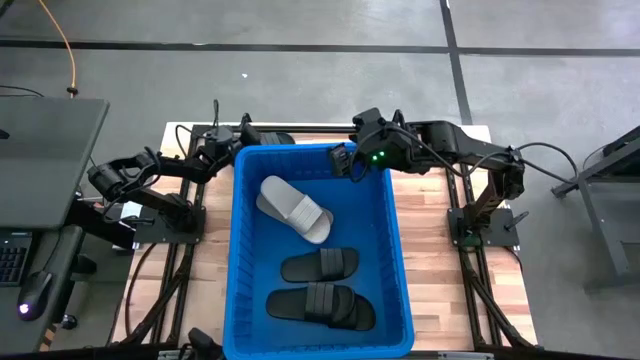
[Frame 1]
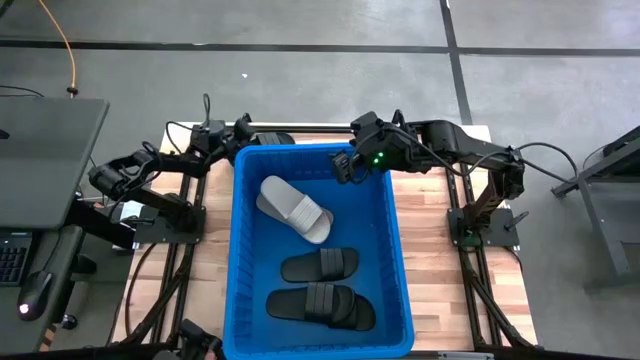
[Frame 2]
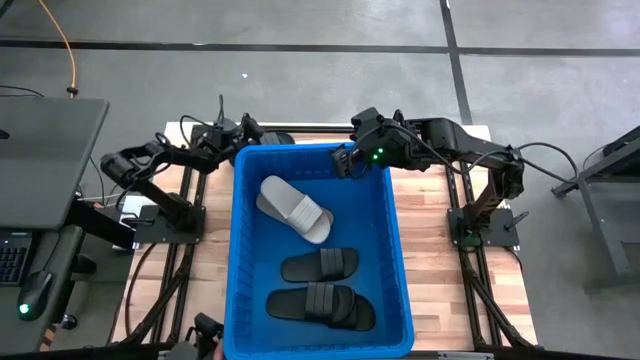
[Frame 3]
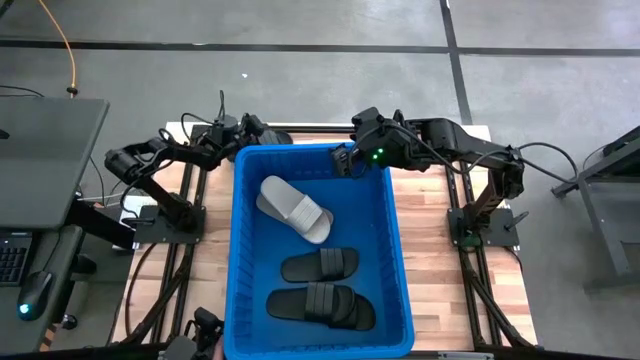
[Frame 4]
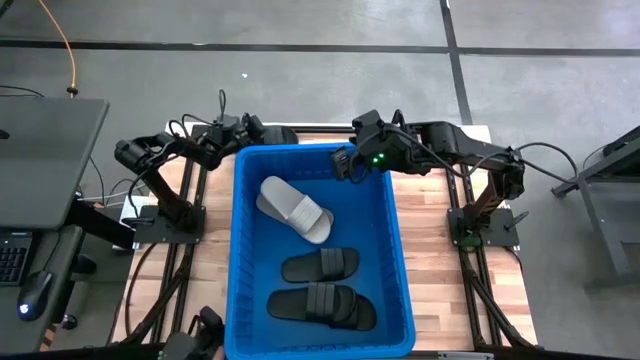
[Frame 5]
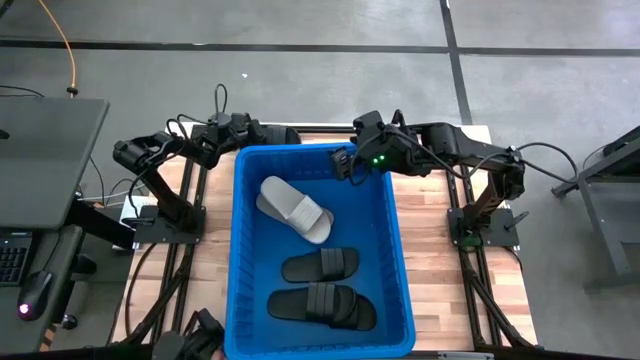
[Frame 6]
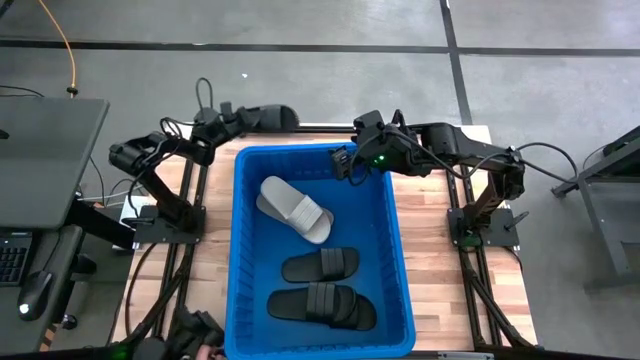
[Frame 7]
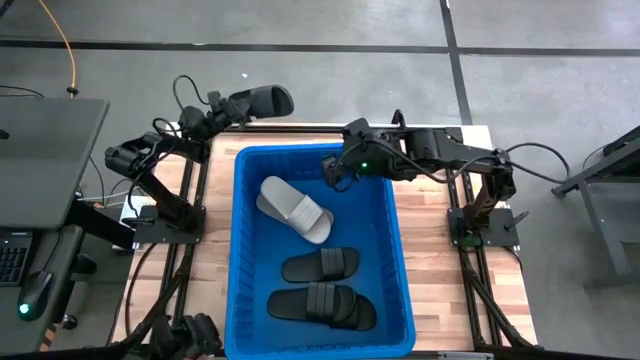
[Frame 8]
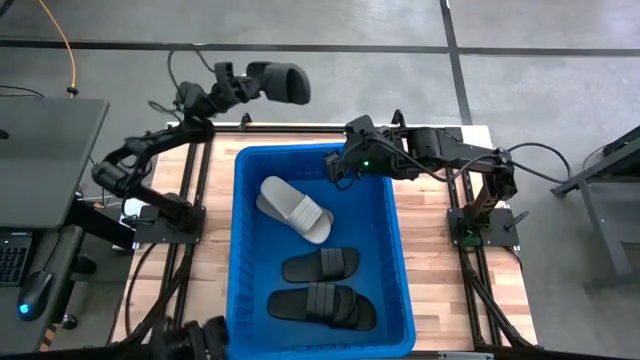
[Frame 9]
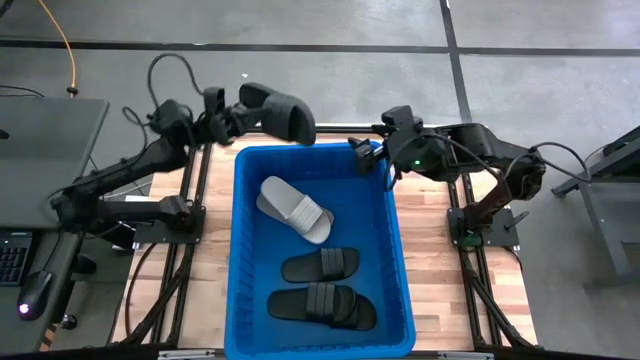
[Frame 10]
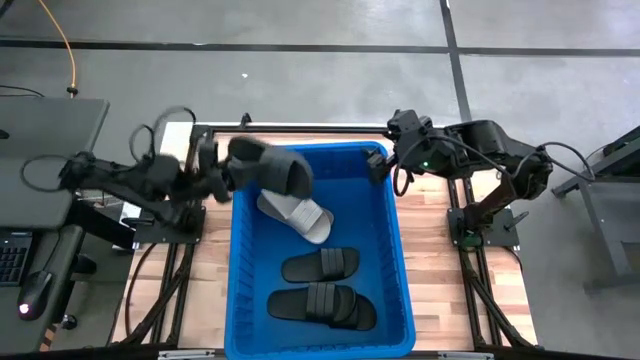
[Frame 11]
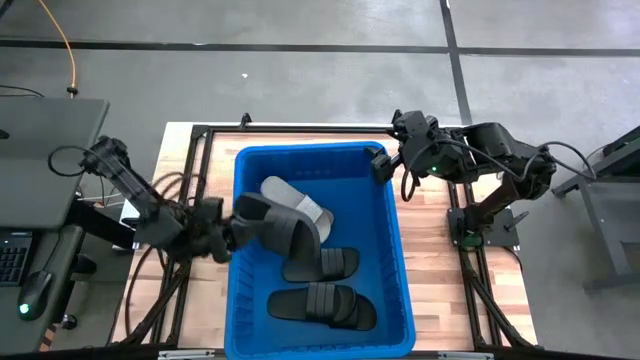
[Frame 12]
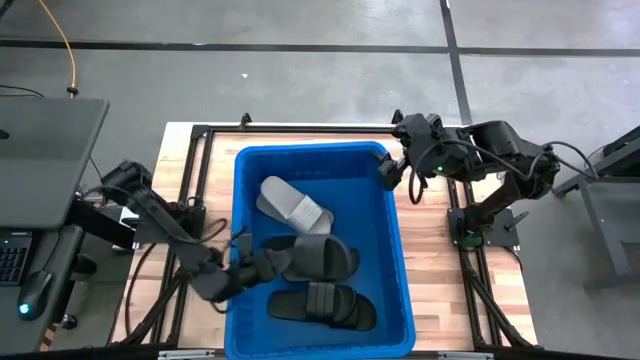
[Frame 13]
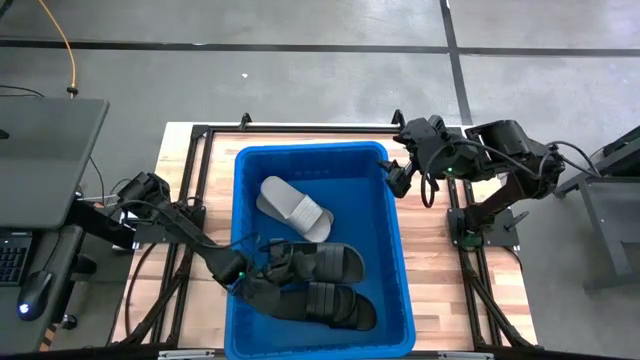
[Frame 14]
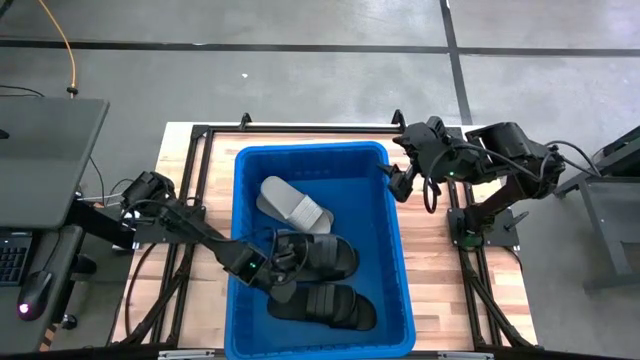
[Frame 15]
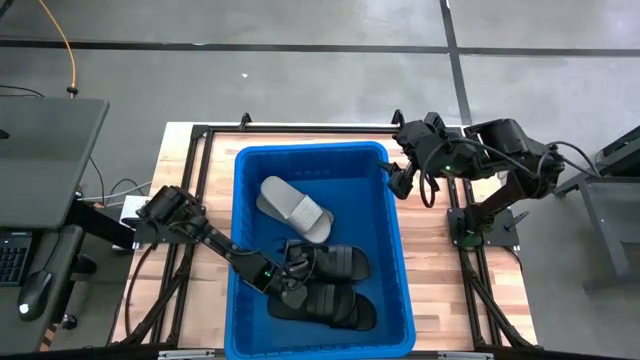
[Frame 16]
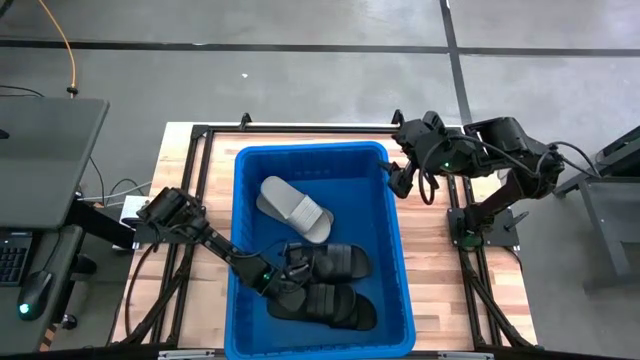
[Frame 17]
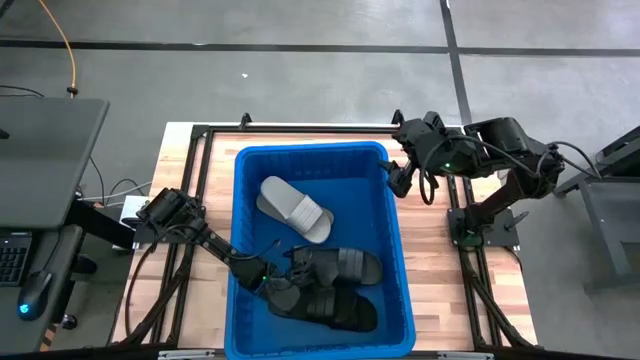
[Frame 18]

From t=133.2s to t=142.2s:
Task: Pick and place slides into bin
Put the black slipper into the blue bin

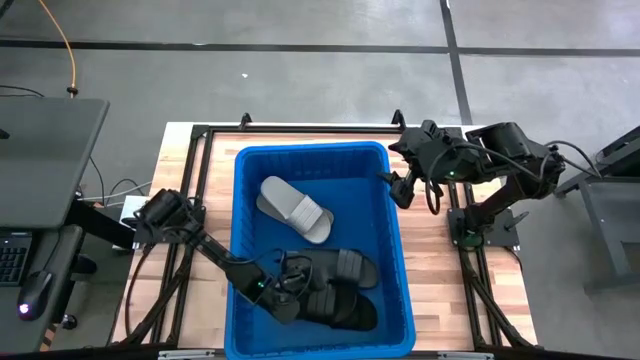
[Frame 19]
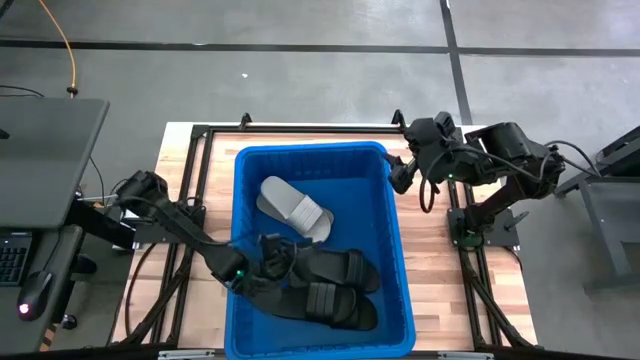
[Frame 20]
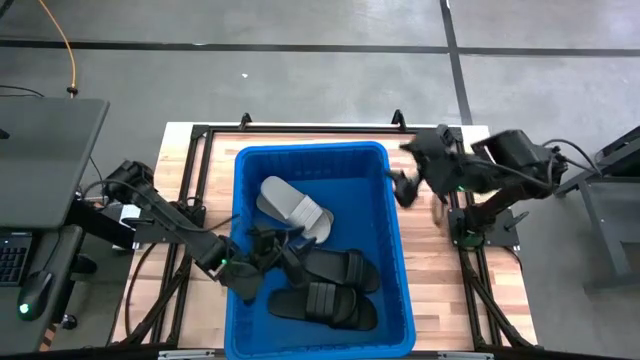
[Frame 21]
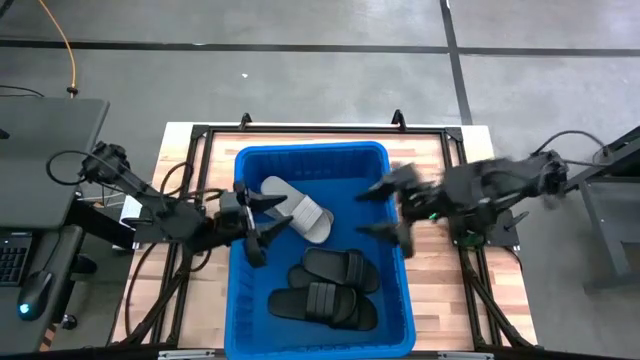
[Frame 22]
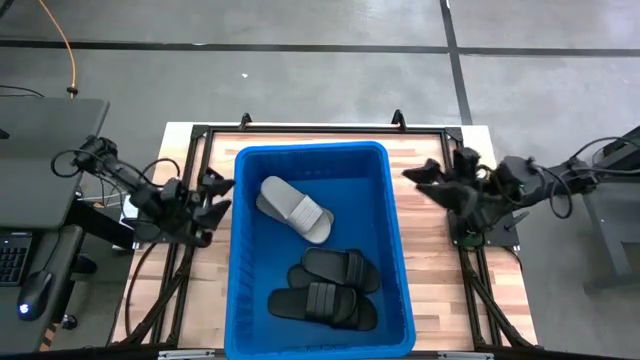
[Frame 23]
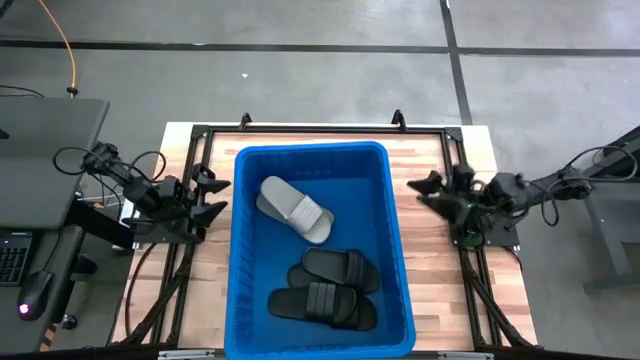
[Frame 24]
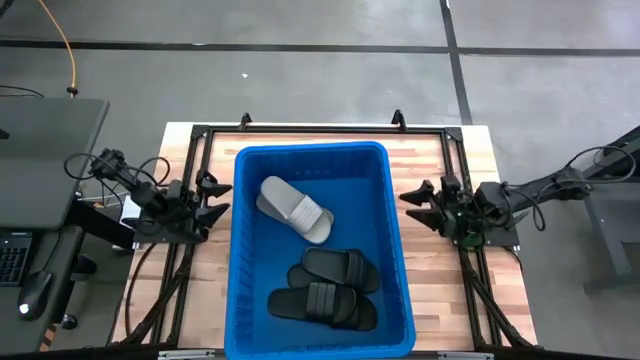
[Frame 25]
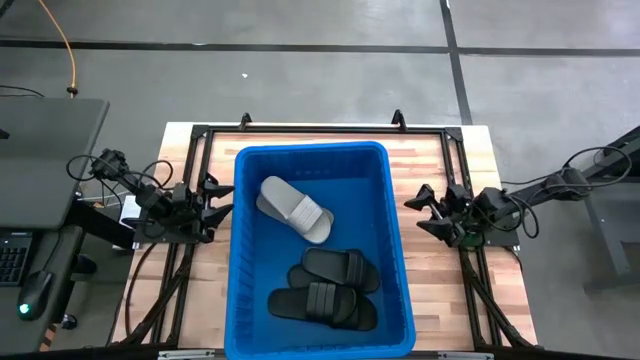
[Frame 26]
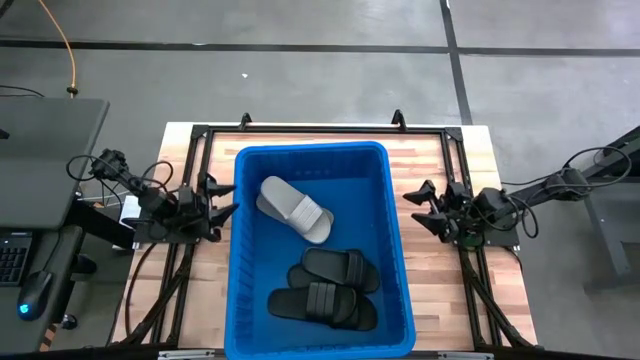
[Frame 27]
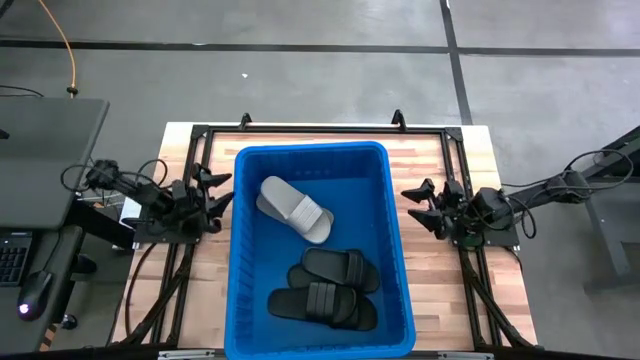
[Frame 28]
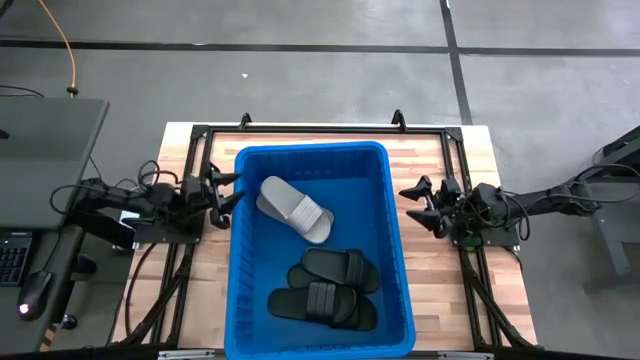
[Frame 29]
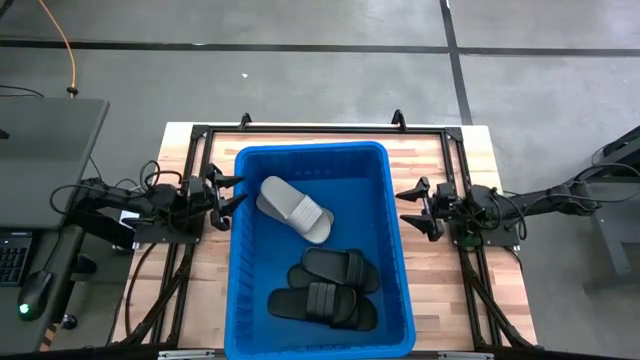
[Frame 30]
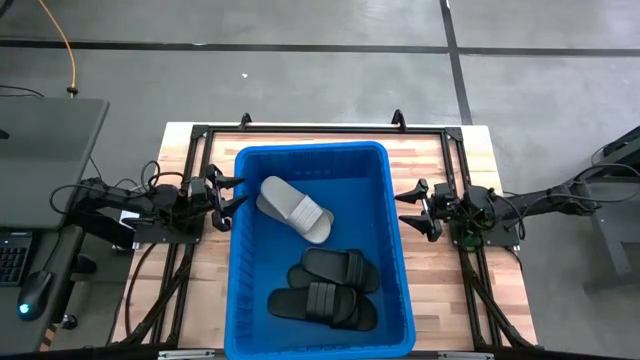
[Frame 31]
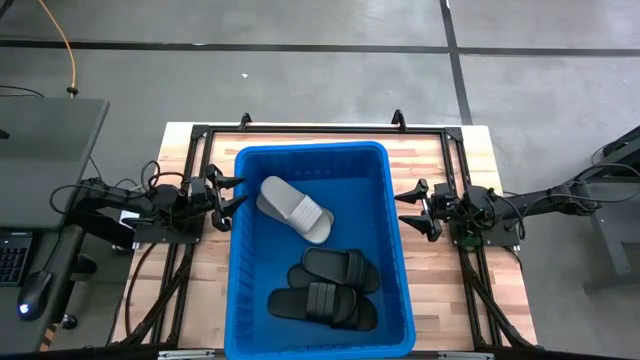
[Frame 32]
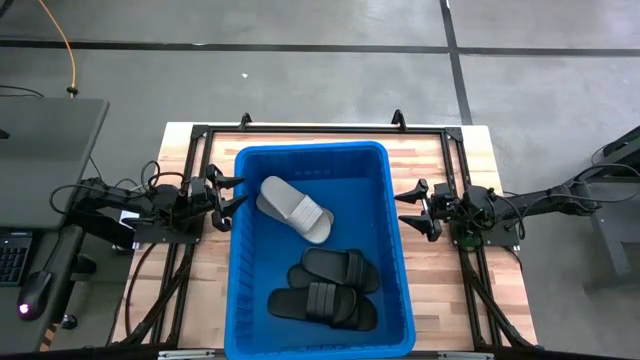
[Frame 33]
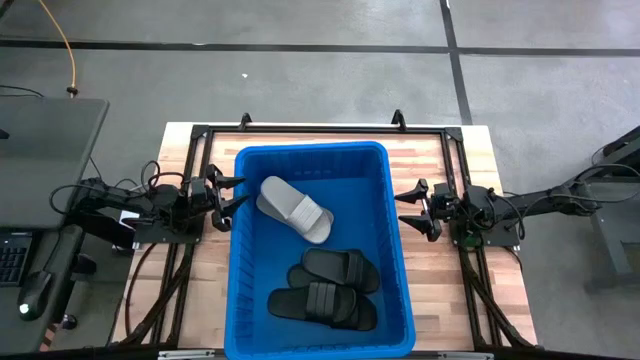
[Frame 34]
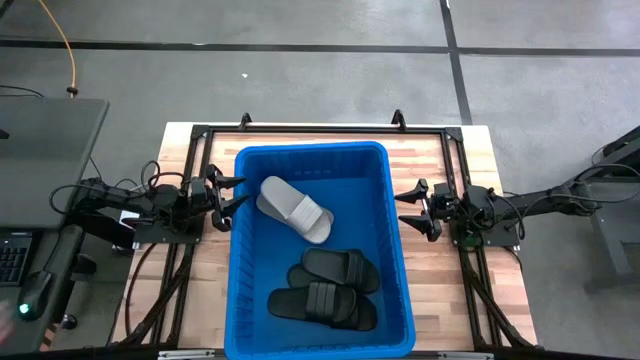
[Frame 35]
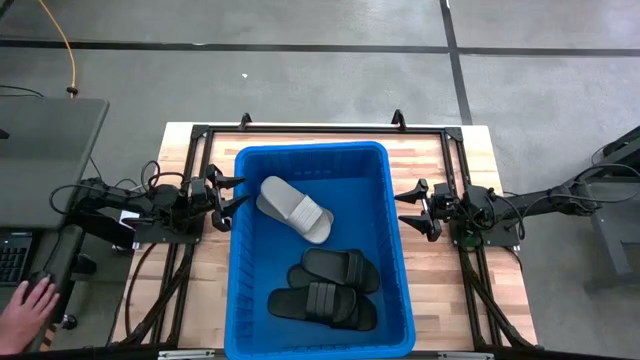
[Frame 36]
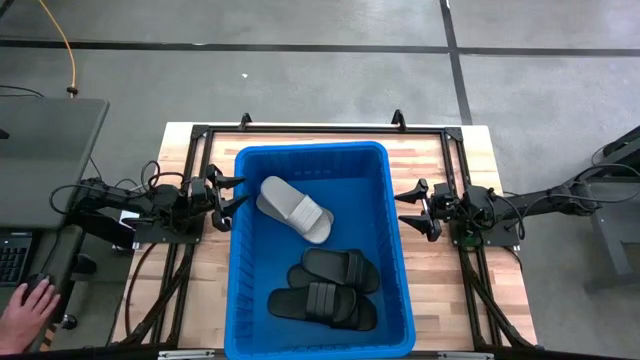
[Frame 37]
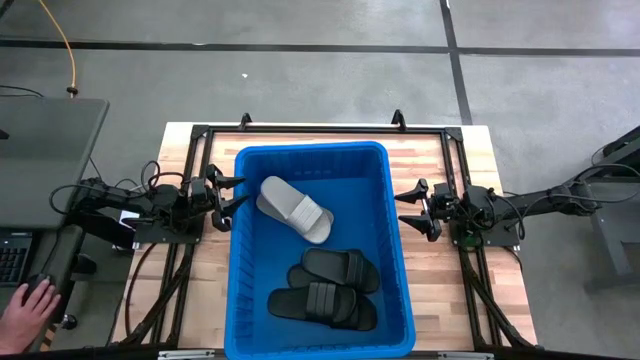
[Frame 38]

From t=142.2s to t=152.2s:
Return to Home Position

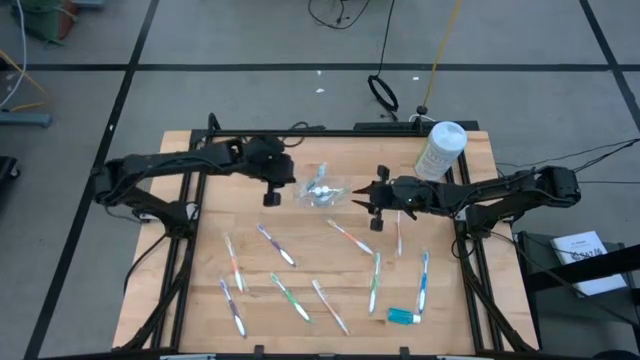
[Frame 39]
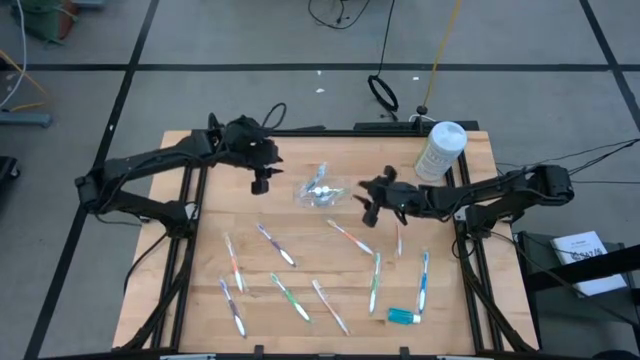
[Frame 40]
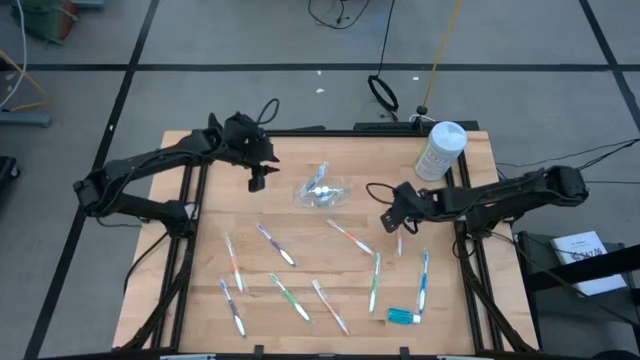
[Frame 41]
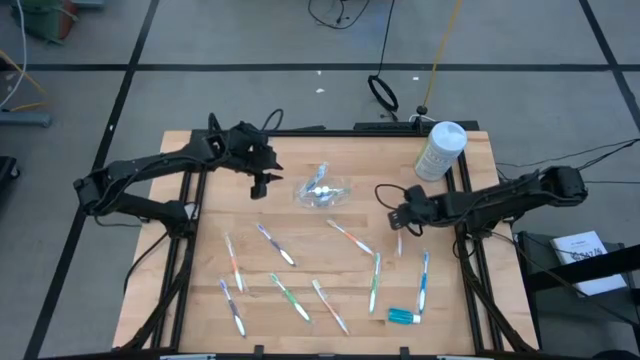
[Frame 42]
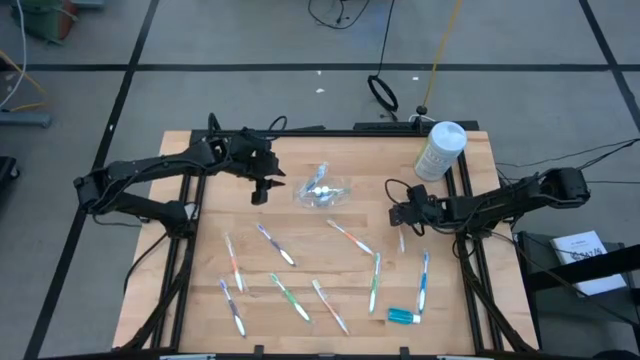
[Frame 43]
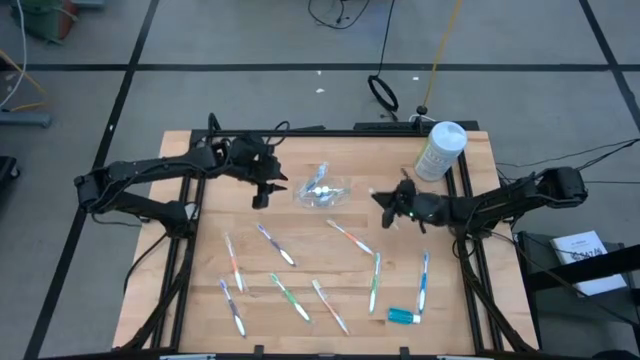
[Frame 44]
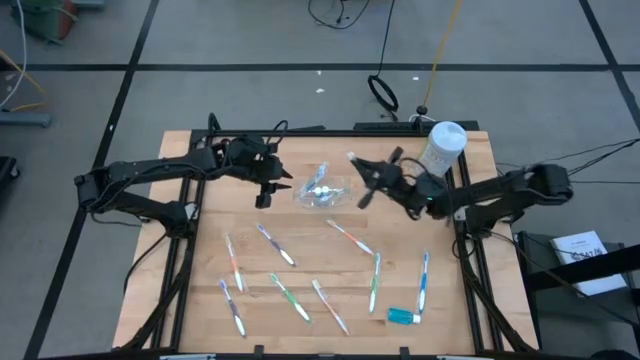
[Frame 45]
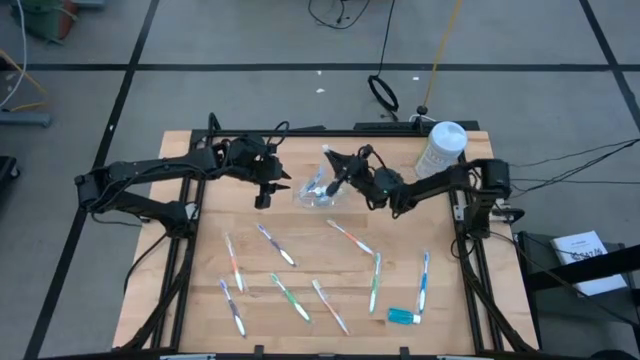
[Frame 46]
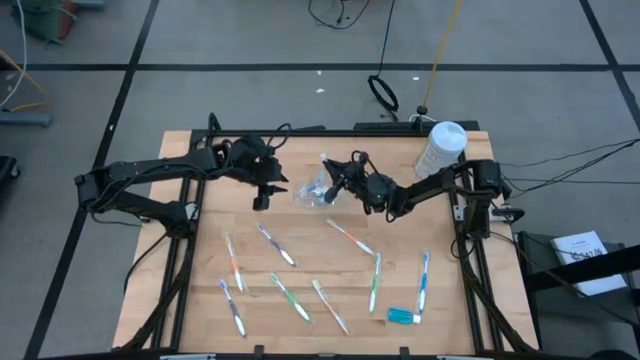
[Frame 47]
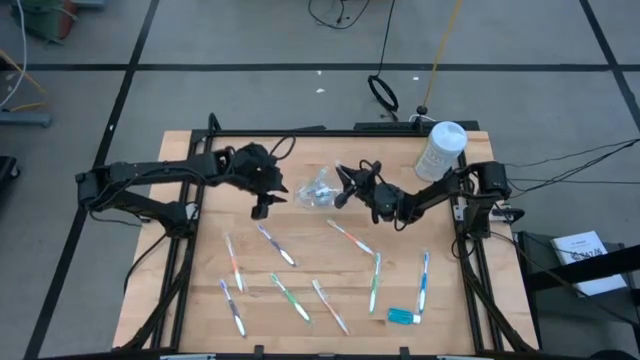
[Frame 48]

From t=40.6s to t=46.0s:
Task: Pick & Place Toothbrushes
Put the orange toothbrush into the transparent organizer
